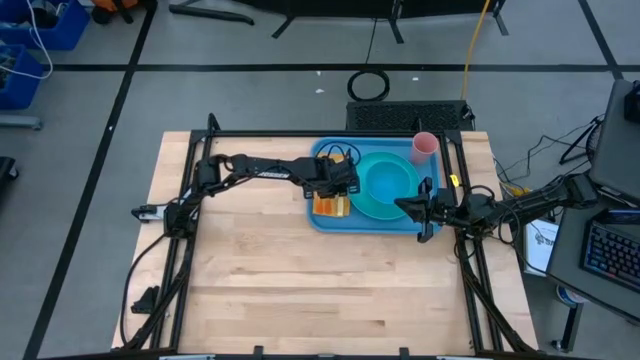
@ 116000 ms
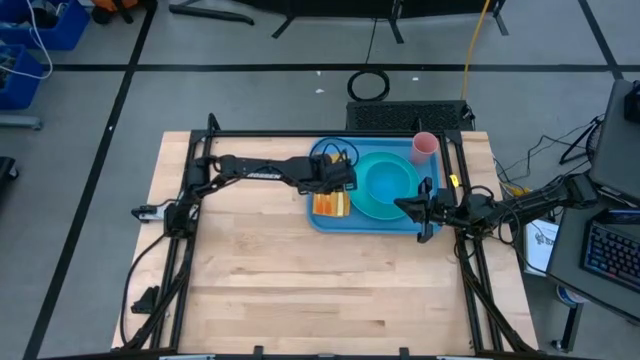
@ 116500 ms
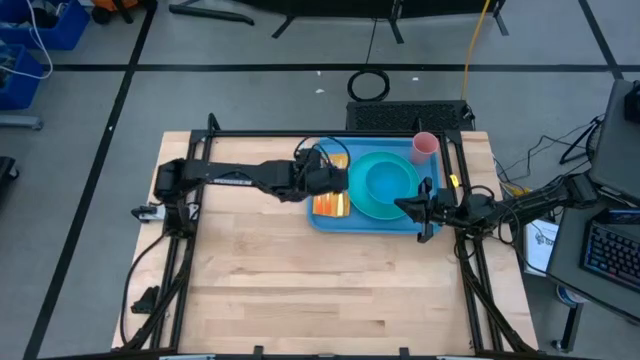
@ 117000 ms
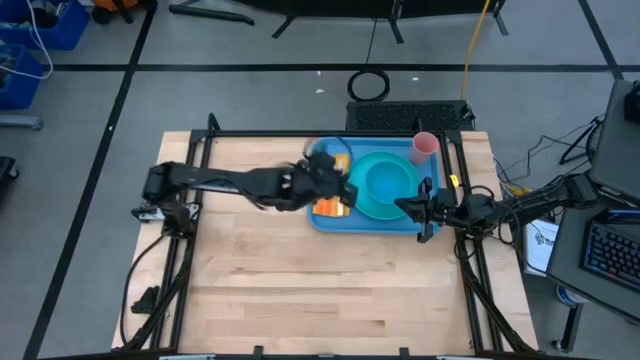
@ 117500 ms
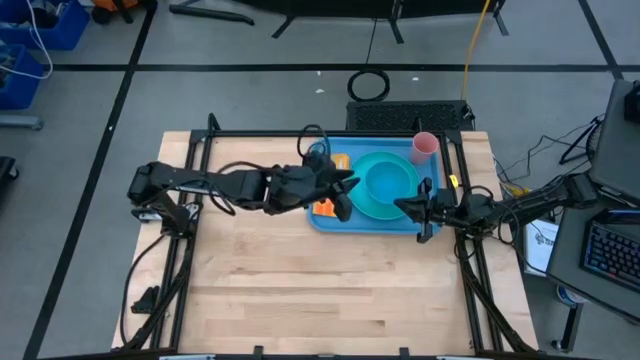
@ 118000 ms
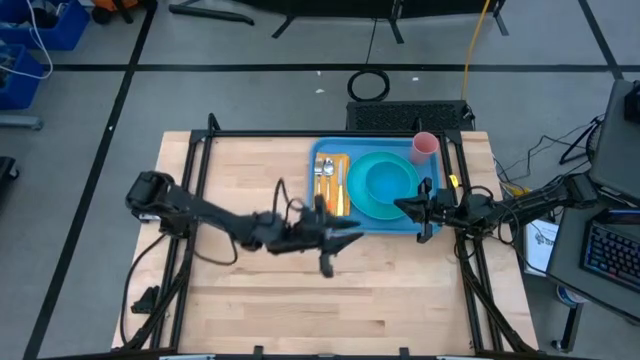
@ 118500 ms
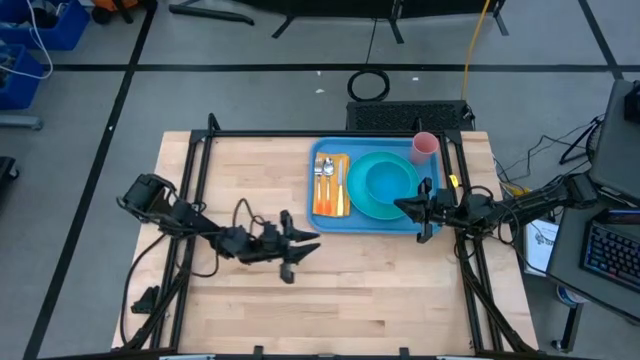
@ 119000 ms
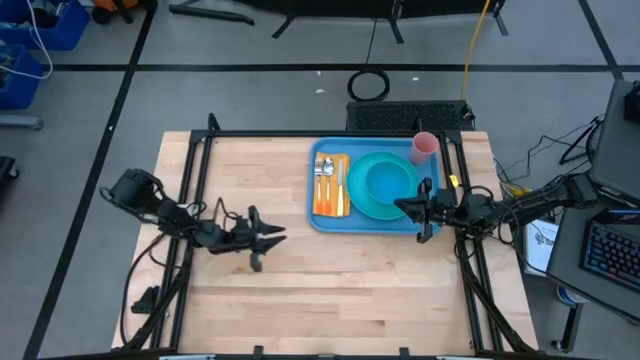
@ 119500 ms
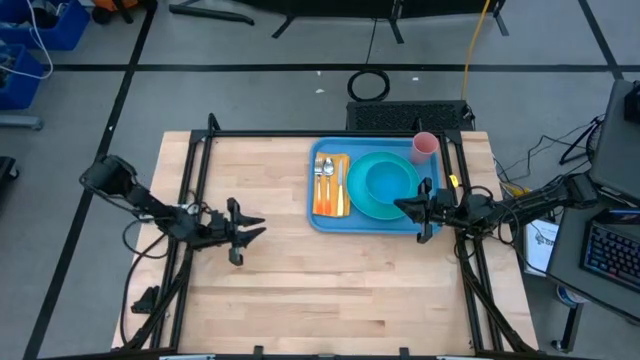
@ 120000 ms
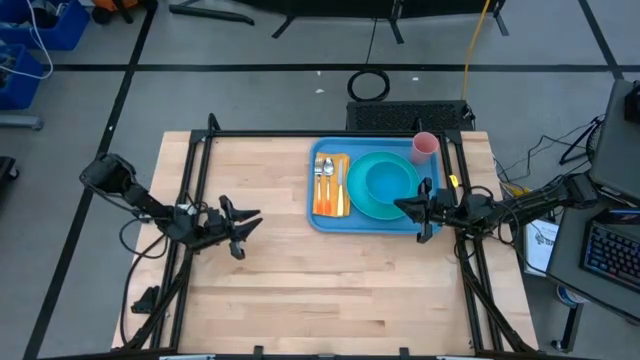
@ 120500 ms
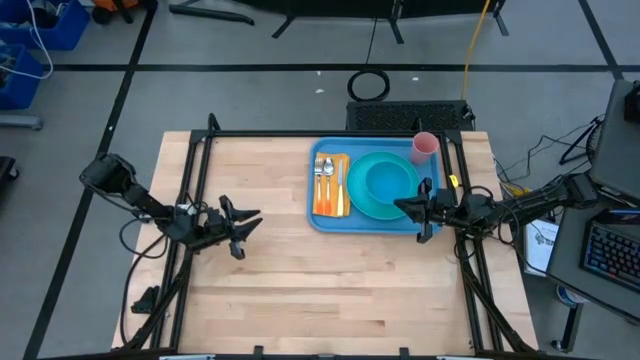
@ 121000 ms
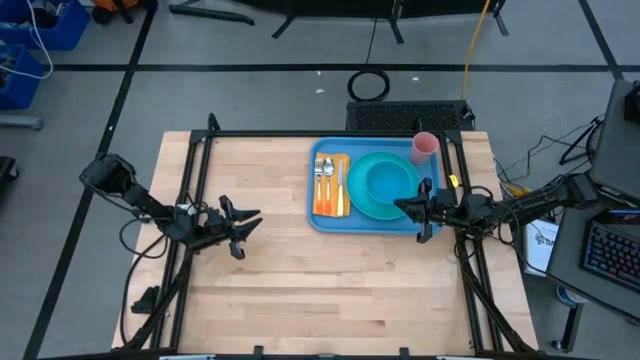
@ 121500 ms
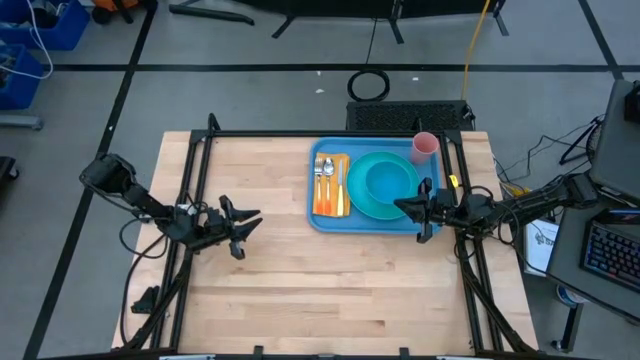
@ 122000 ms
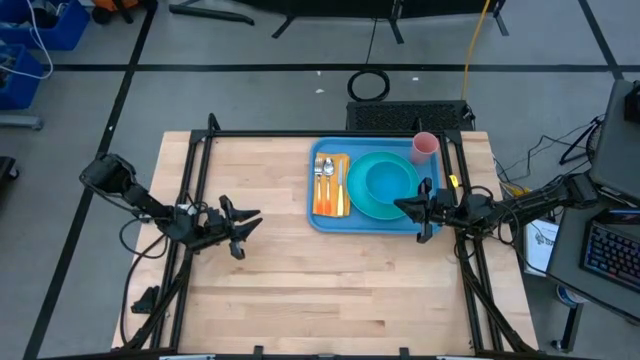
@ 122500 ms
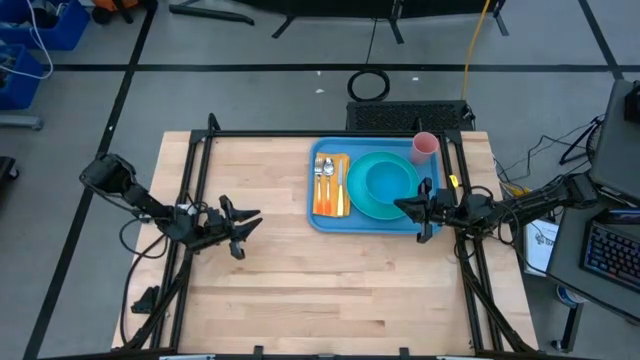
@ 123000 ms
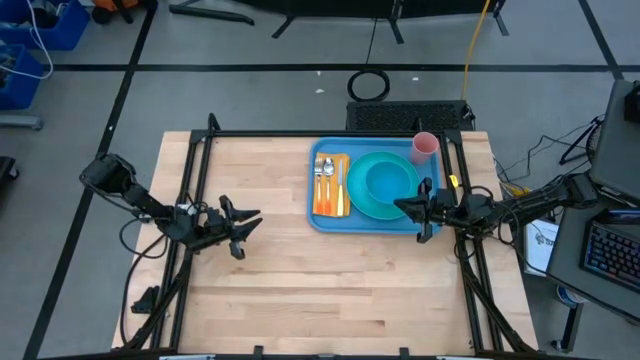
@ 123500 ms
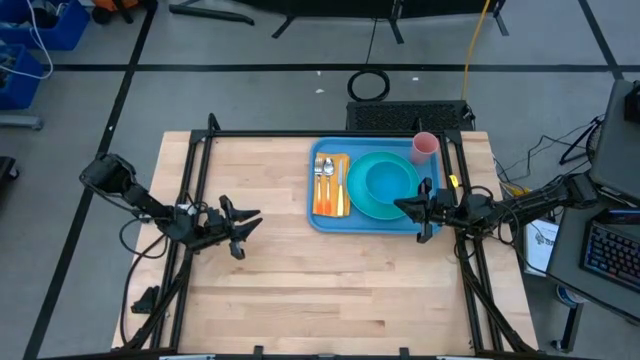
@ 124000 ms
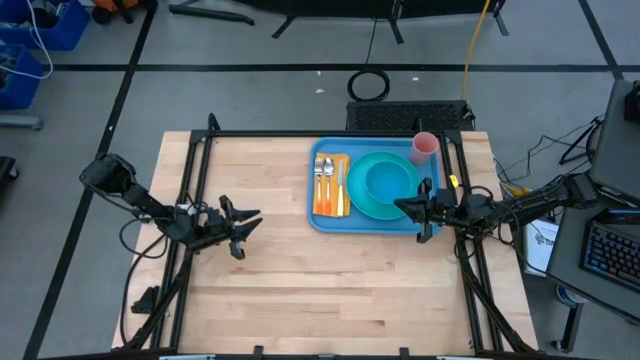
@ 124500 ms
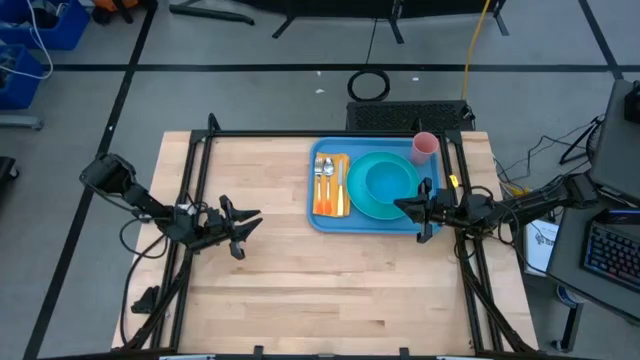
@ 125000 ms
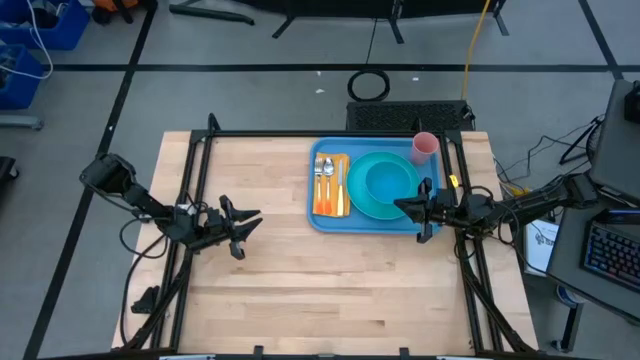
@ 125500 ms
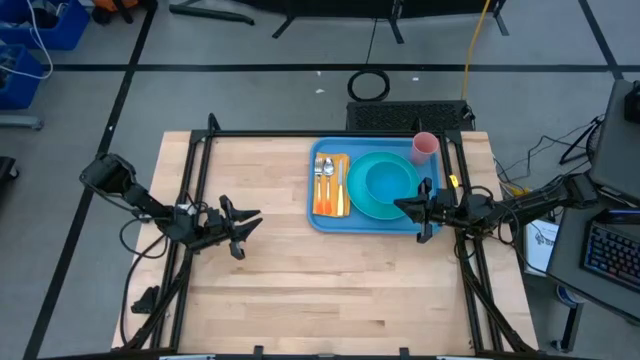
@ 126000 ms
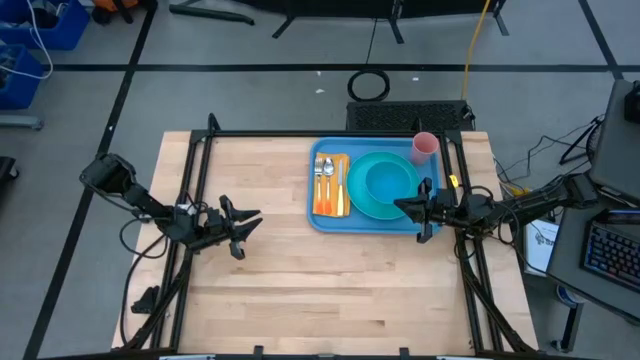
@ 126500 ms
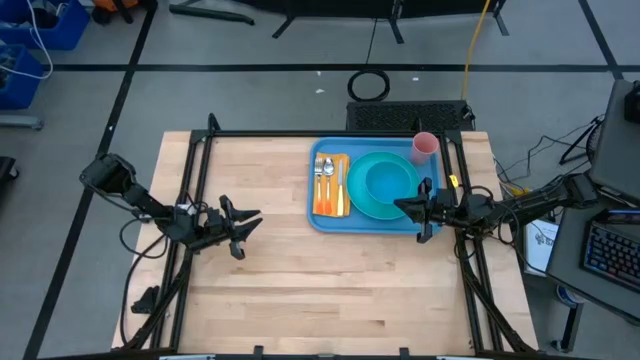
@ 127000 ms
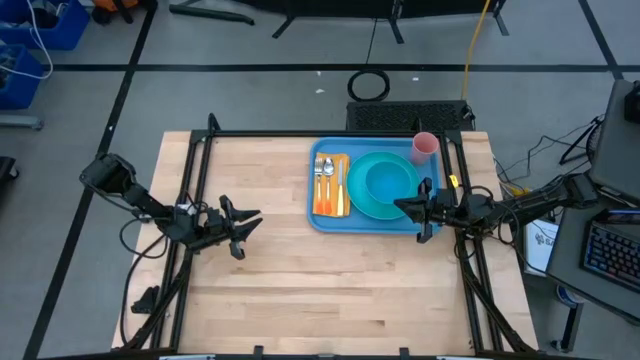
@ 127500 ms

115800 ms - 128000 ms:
Task: Set up tray
Return to Home Position

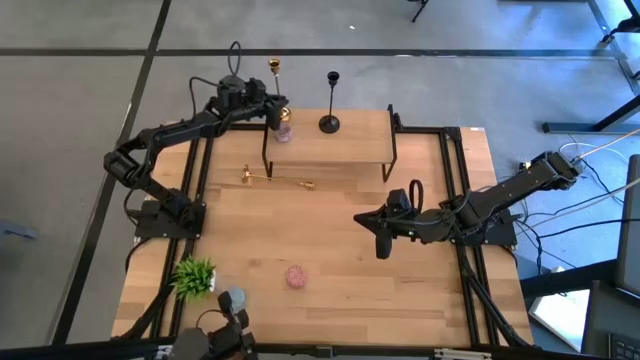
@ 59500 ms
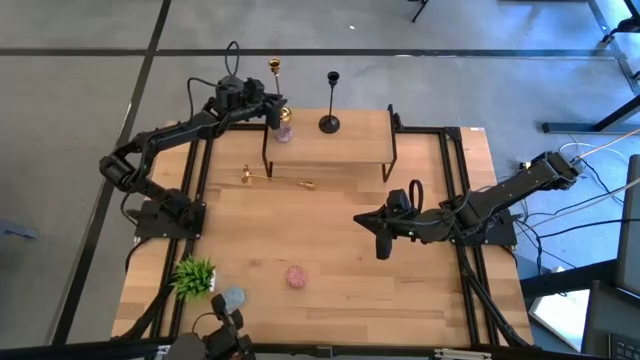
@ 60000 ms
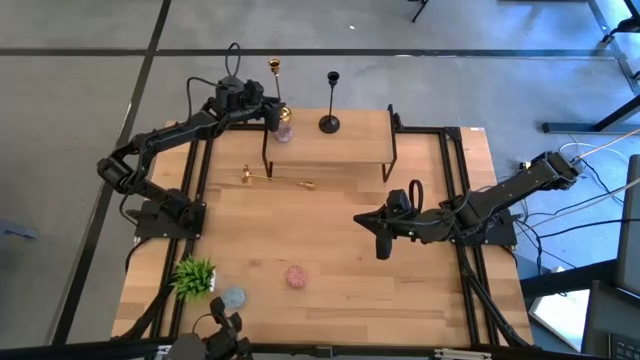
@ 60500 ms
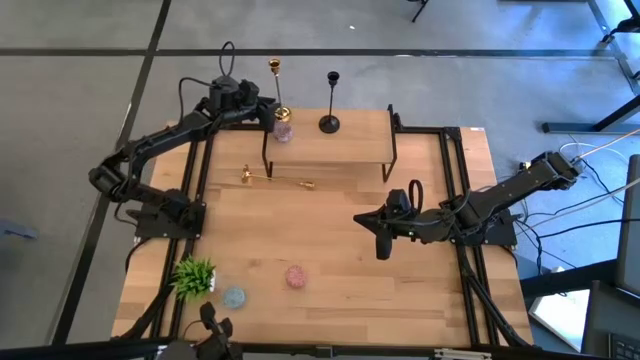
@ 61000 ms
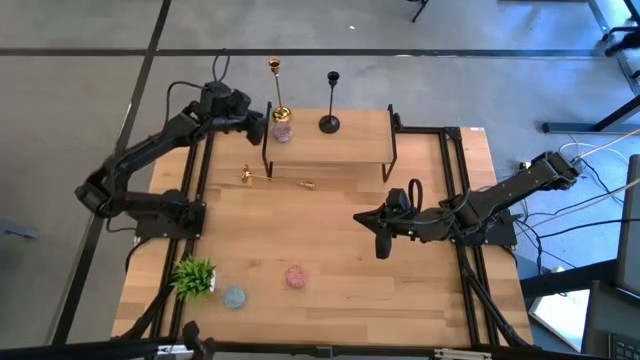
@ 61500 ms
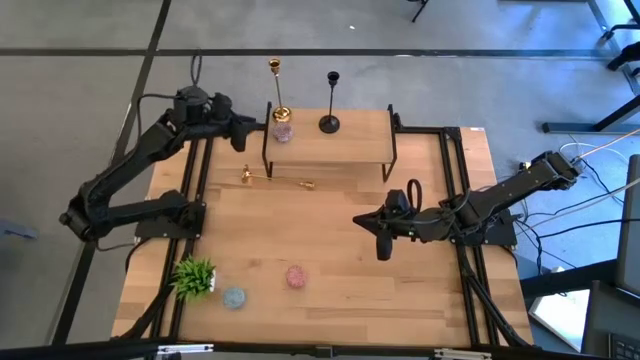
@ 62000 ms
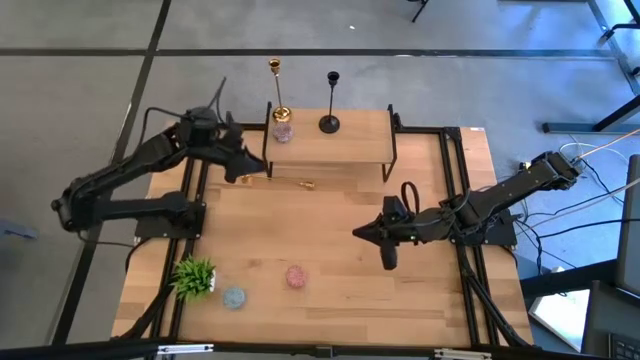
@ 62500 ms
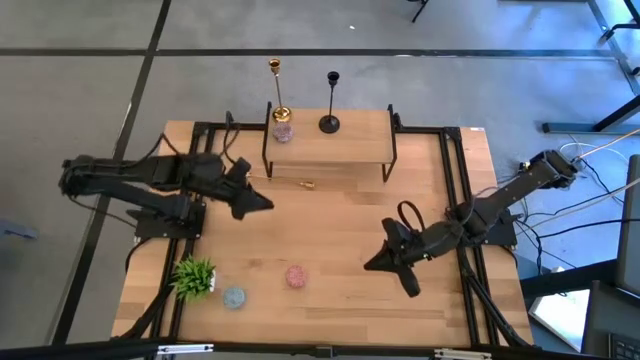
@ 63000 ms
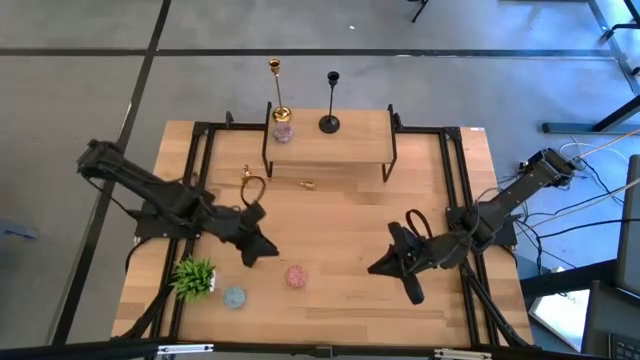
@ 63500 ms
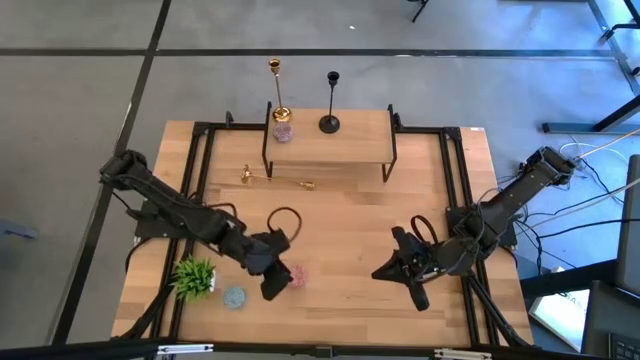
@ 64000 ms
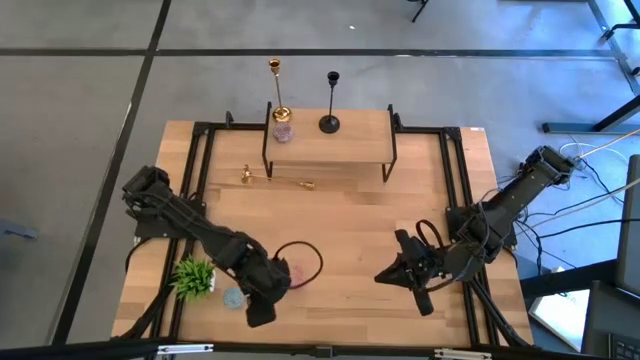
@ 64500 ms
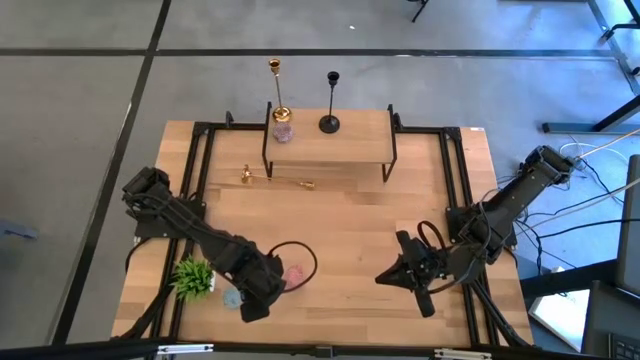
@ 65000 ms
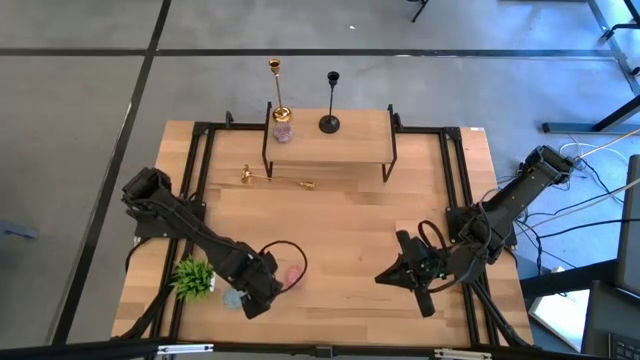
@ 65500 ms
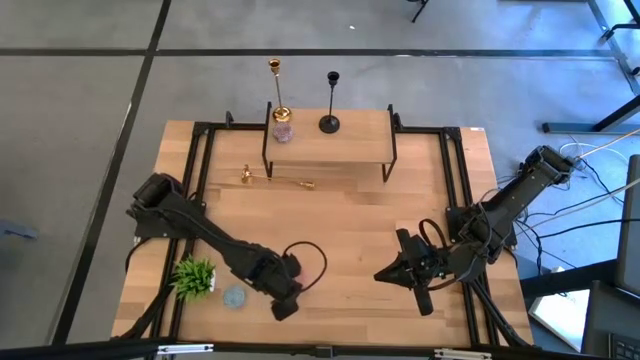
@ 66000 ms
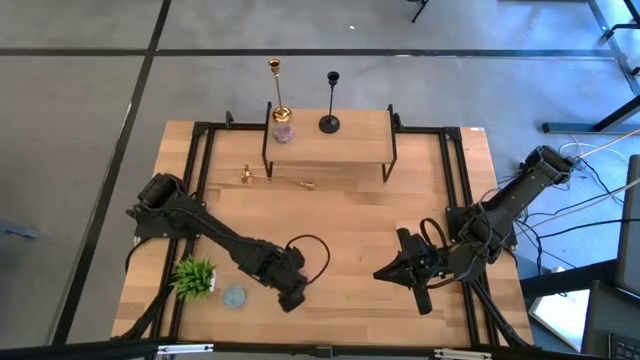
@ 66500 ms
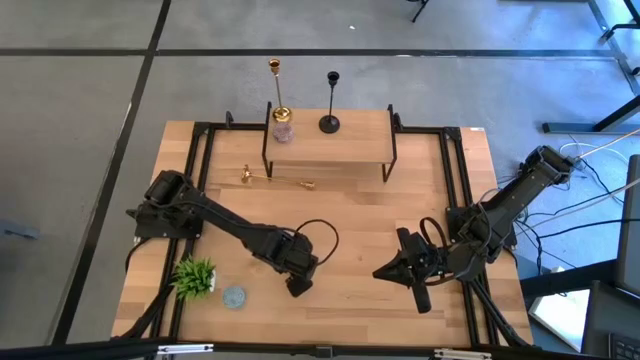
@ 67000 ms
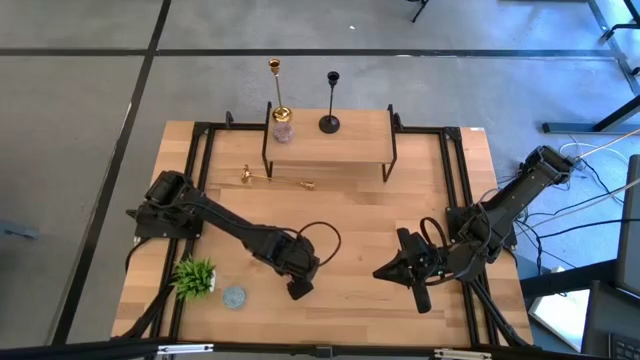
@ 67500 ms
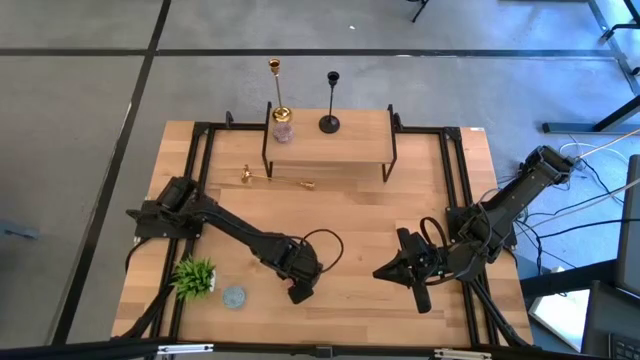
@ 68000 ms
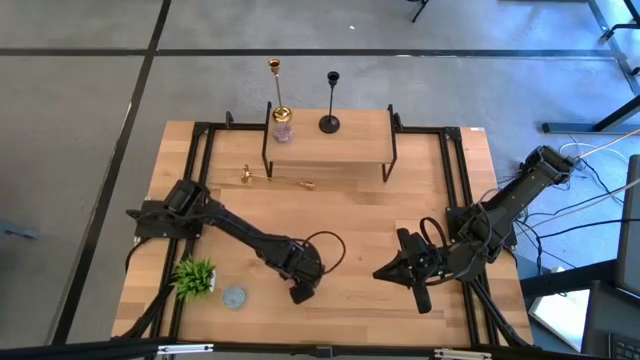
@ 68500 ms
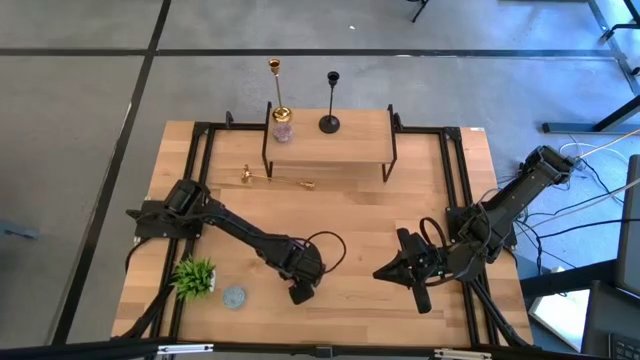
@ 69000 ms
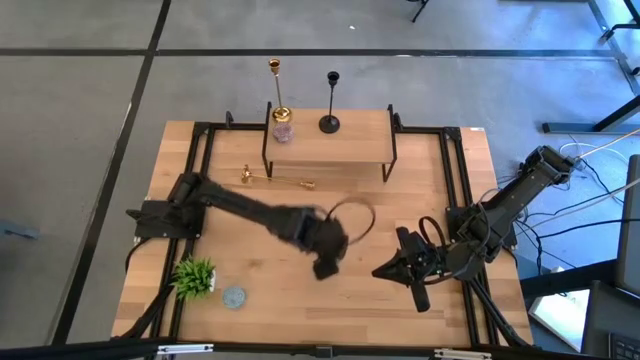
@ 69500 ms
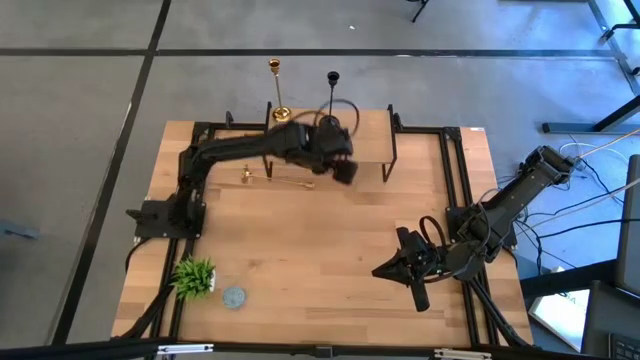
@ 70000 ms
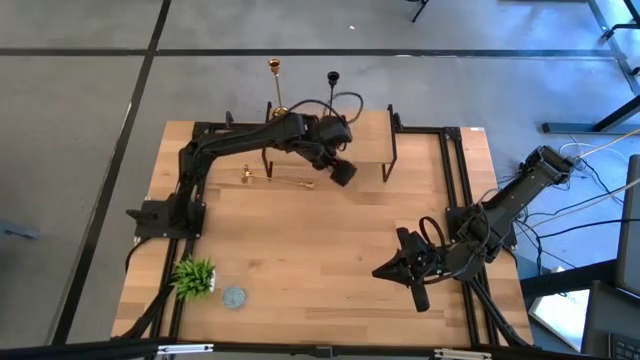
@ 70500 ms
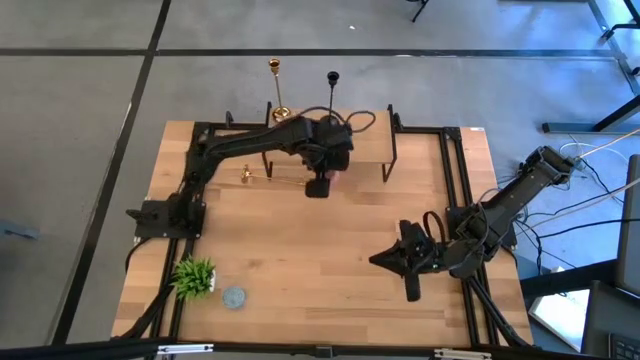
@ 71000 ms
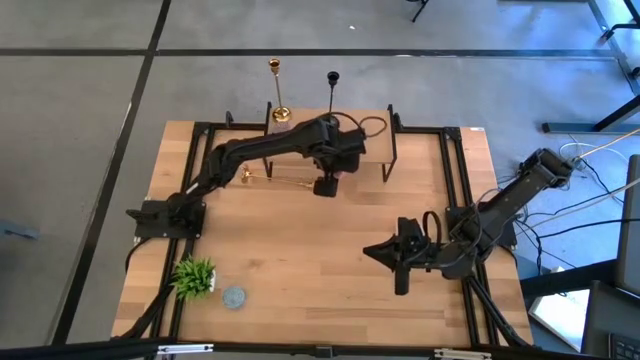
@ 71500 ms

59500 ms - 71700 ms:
Task: Pick & Place candle stick holders
Put the pink scented candle on the shelf
